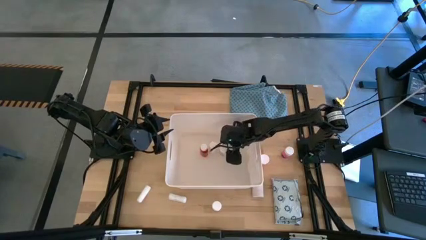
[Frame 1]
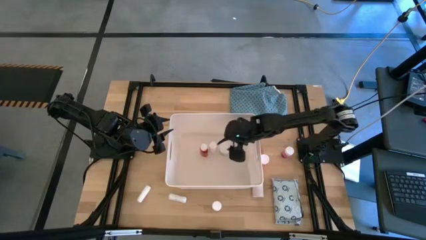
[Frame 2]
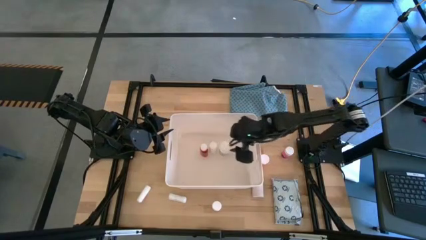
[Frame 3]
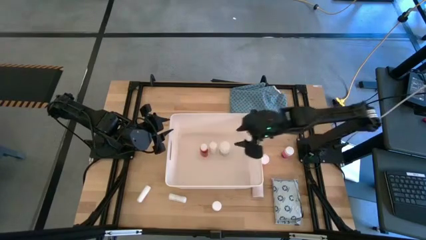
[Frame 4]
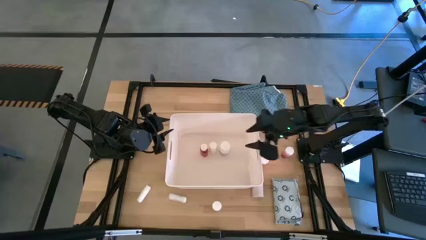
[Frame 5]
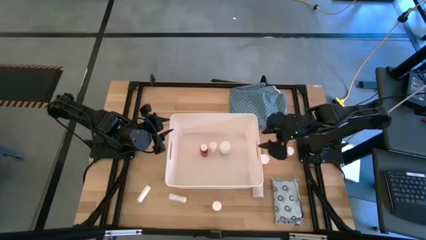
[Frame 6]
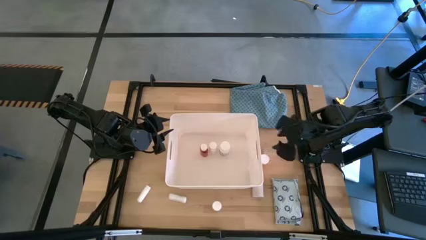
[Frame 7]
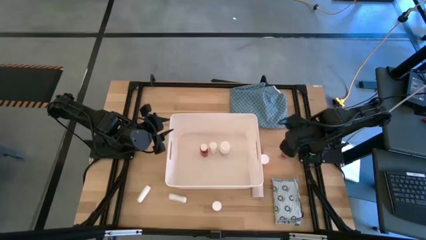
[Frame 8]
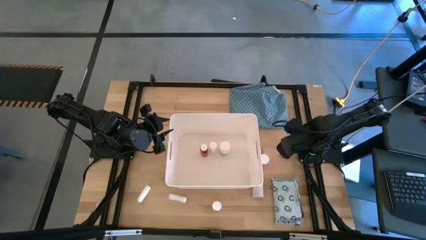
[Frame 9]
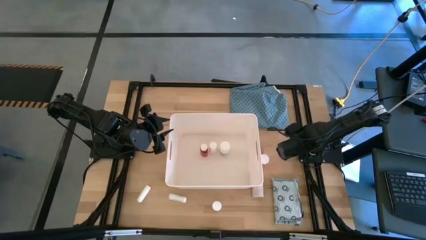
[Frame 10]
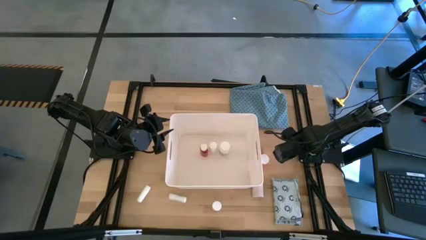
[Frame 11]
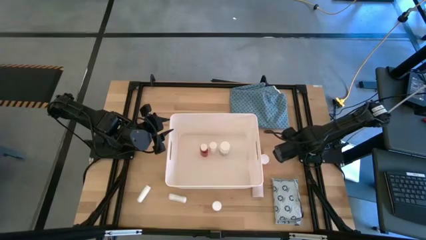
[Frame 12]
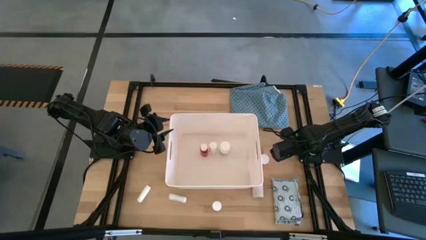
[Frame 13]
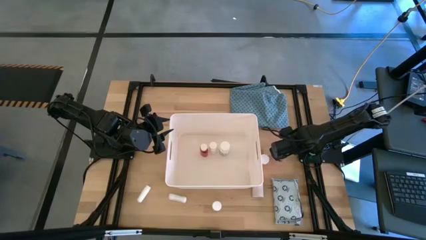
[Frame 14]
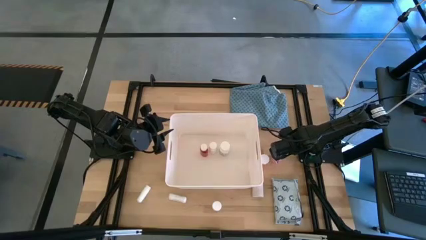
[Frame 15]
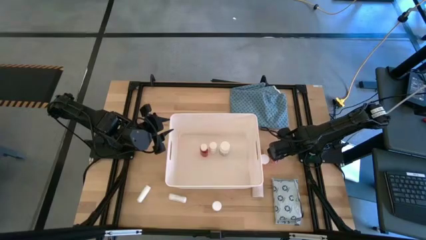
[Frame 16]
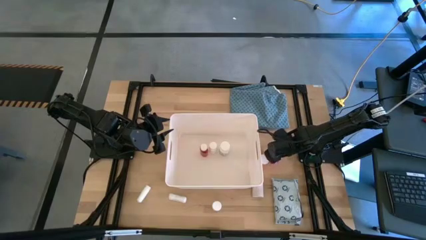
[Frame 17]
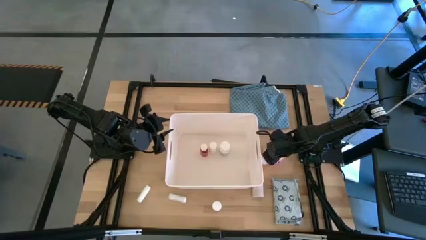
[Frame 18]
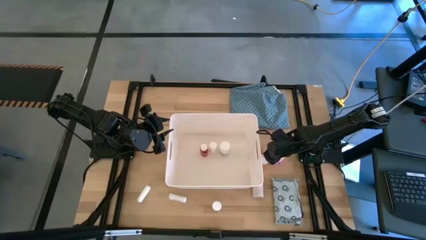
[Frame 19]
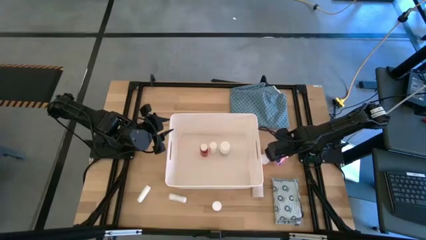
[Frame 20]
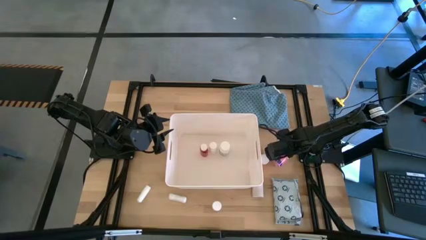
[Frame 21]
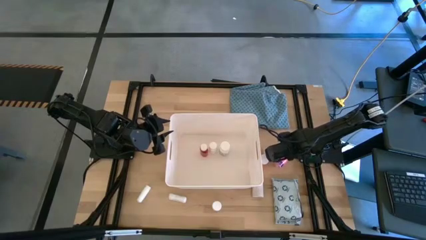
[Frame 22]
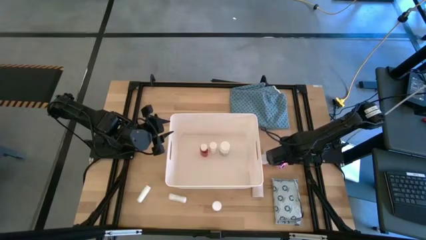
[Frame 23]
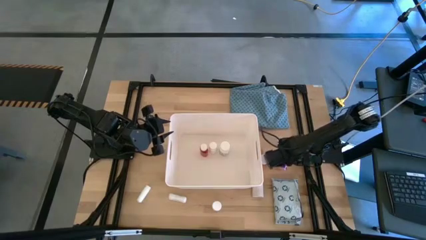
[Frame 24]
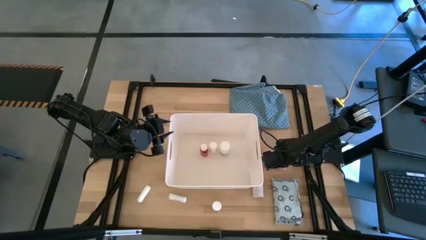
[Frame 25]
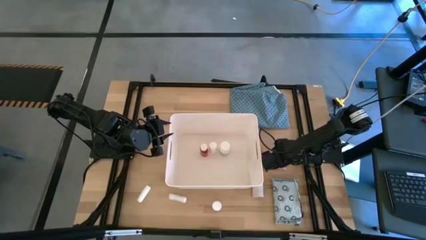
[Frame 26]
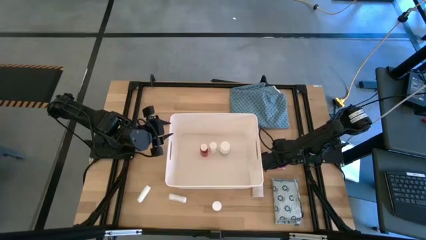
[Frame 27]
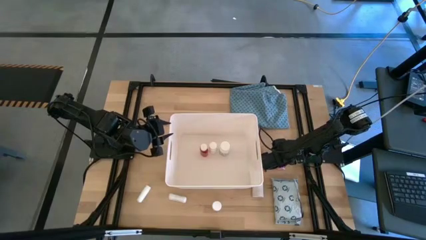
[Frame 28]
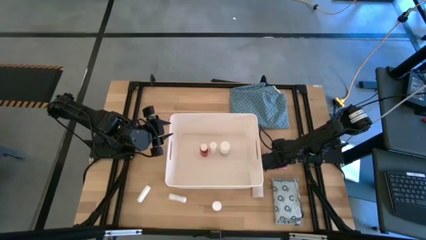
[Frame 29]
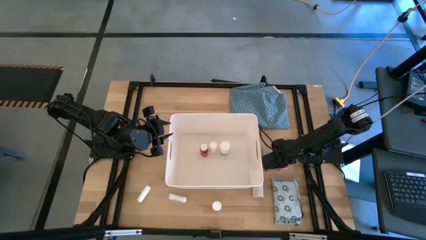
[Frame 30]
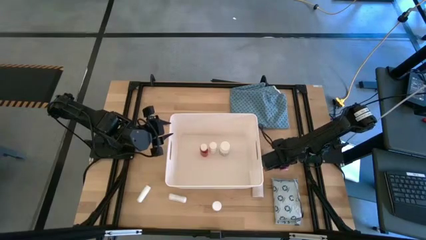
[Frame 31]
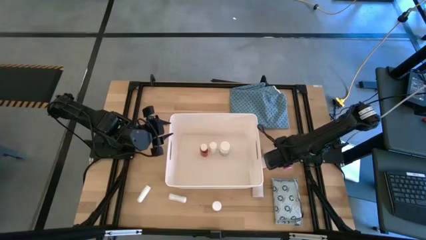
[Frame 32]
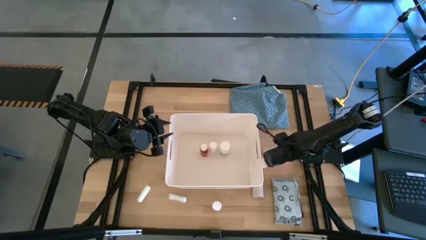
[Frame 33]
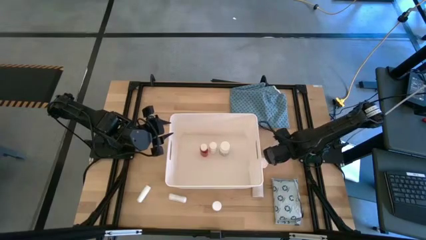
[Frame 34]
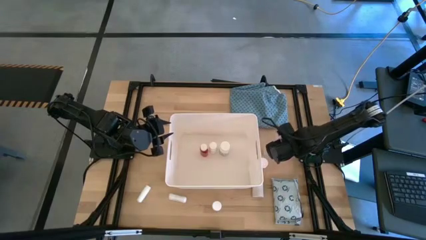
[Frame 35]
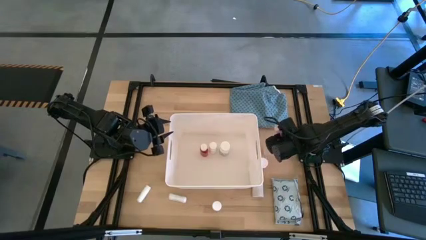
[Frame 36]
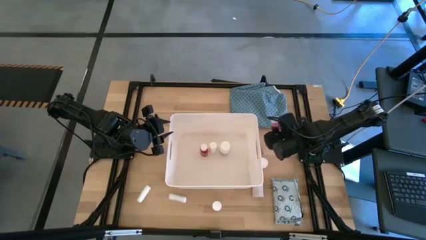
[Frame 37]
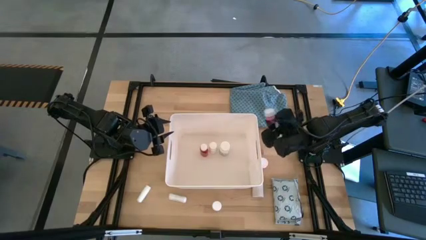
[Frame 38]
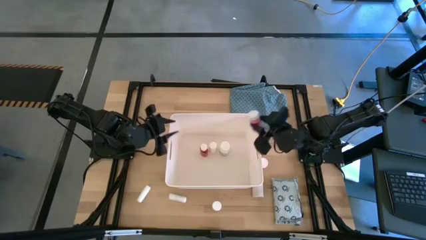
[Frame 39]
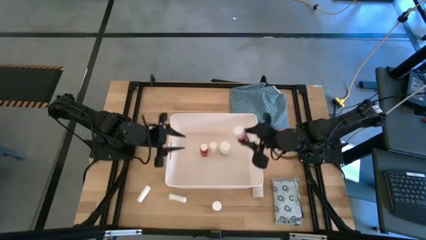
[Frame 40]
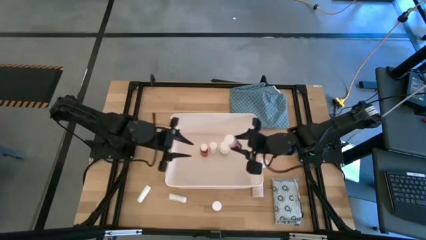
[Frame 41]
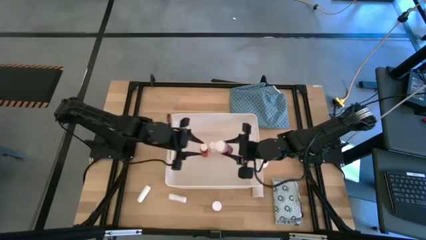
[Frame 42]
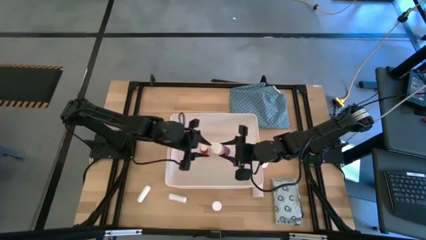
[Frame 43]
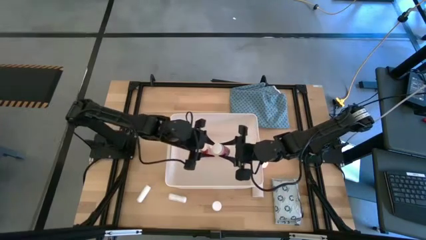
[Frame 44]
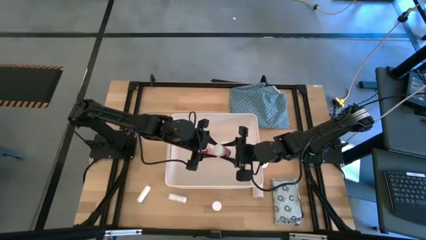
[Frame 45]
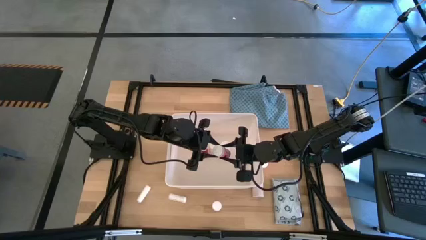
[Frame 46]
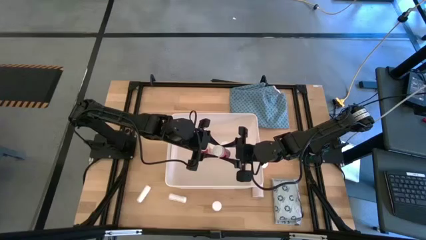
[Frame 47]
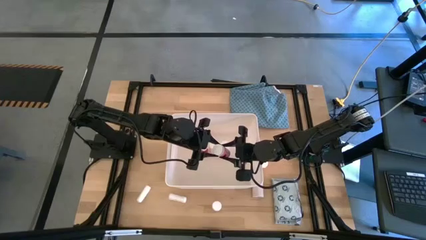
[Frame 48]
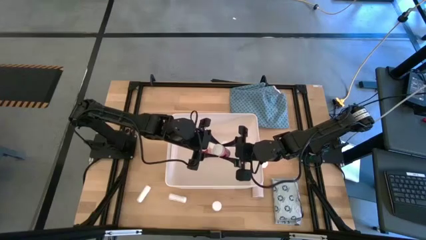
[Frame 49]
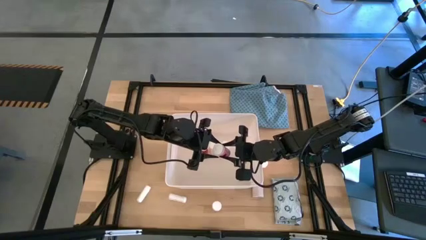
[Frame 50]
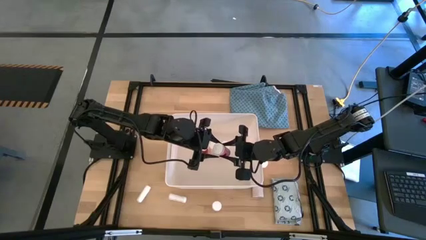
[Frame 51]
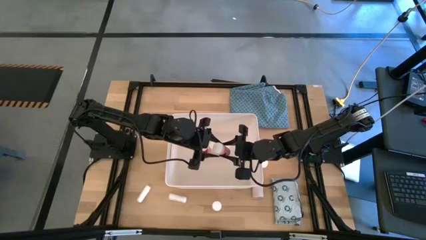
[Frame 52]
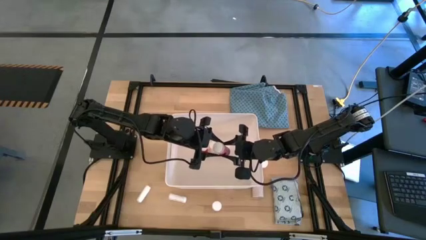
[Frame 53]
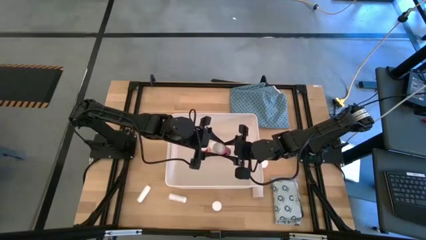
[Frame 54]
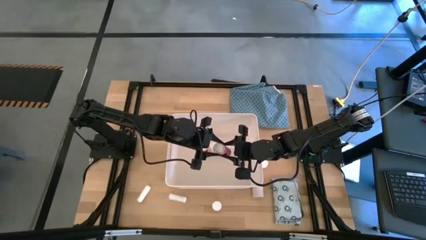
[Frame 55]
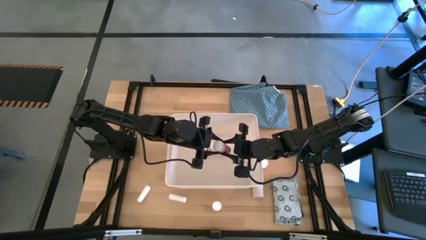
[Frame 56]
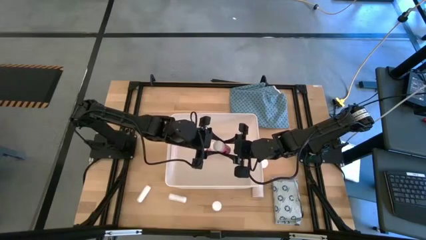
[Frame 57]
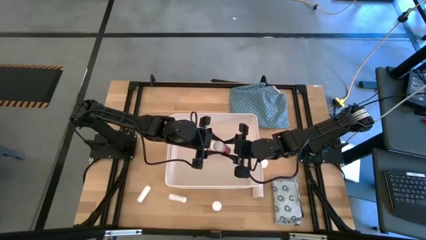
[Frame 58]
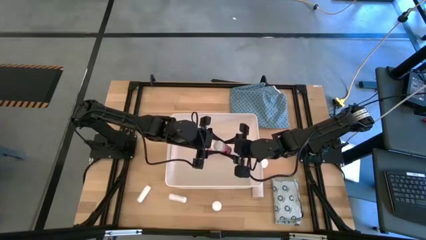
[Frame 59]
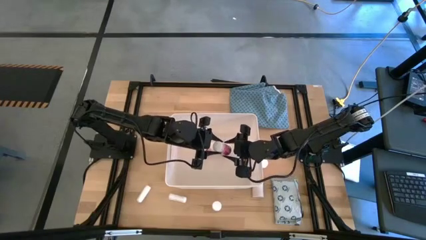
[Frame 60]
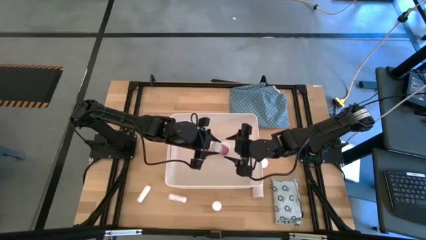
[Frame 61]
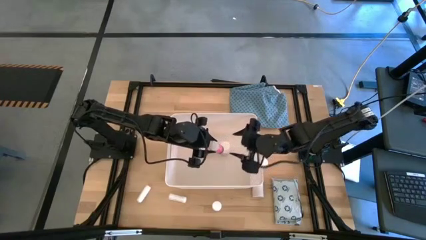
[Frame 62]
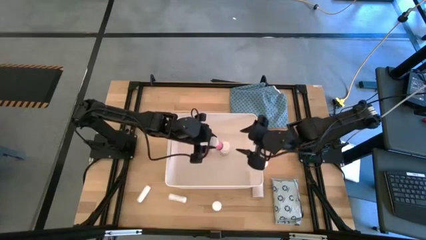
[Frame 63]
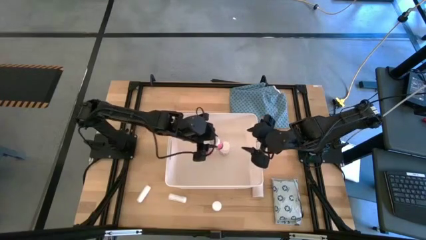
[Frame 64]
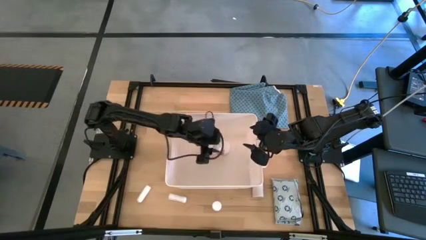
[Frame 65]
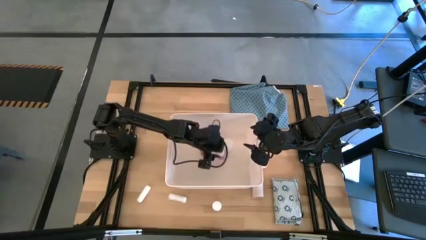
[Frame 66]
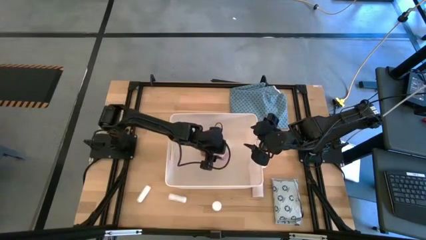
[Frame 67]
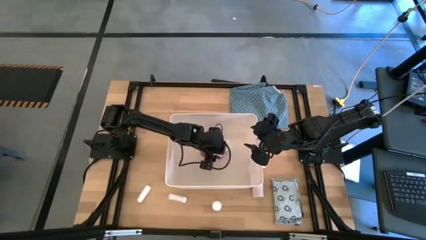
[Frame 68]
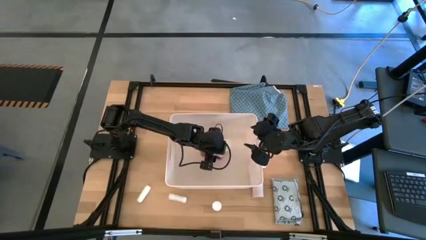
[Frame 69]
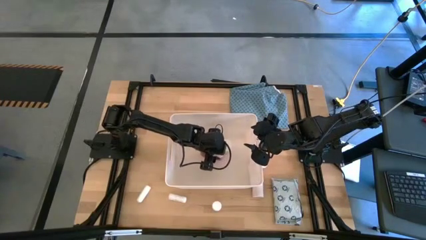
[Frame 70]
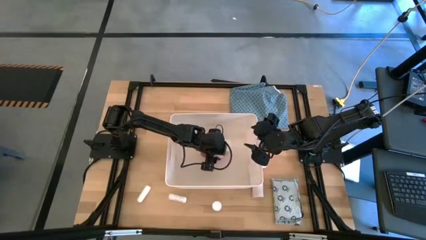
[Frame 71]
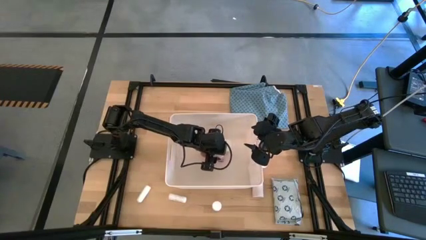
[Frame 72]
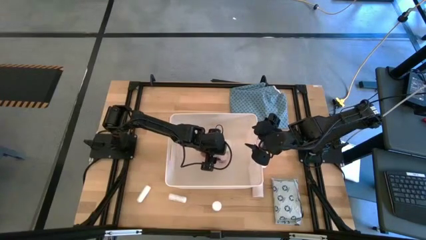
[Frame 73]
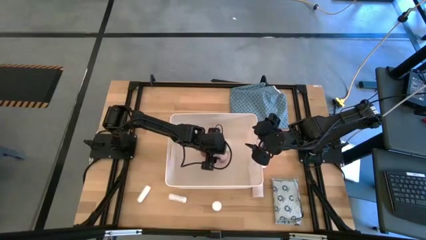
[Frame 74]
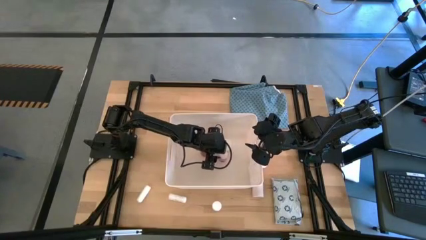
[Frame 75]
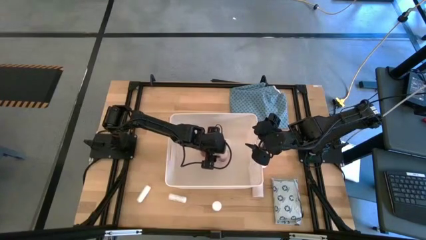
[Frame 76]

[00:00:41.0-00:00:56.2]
Task: Pick & place medical supplies in basket/bin
Put the pink medicine bottle into the white bin
